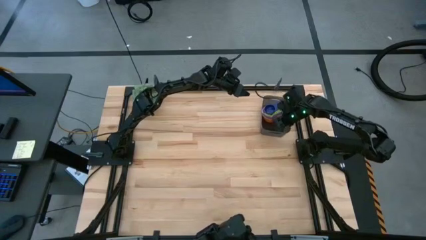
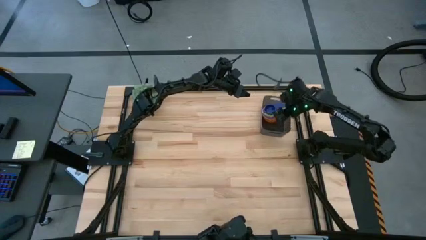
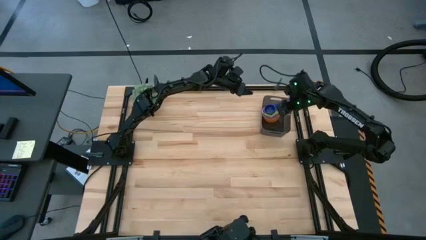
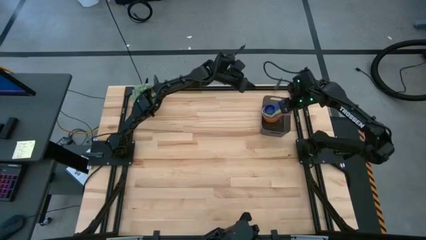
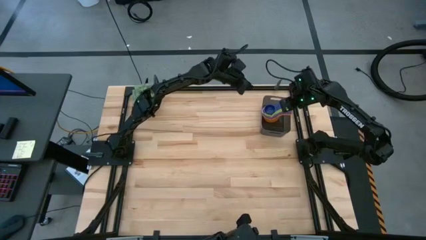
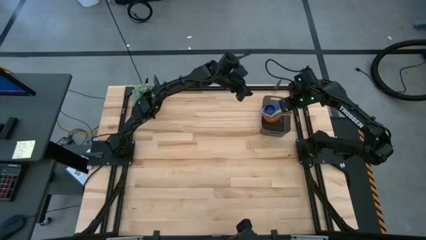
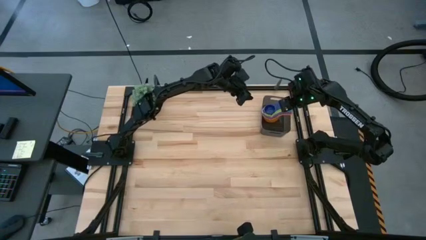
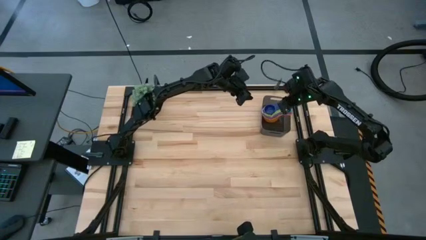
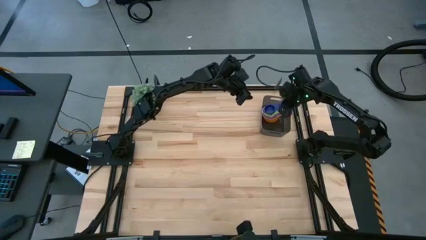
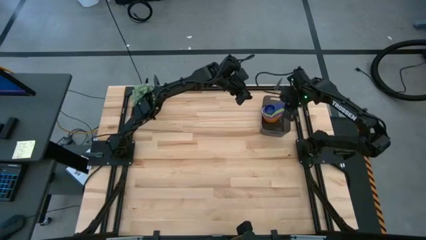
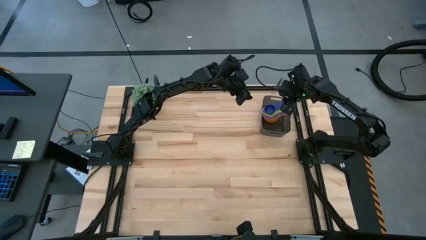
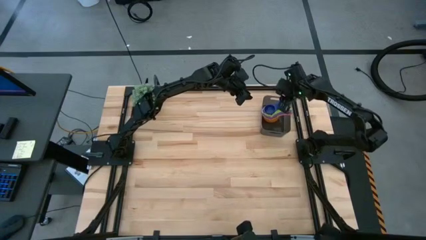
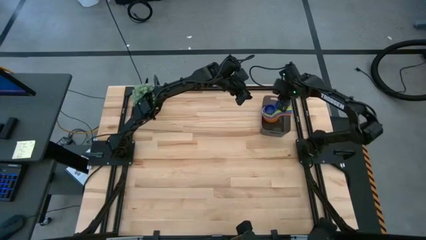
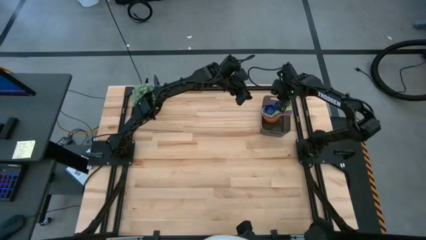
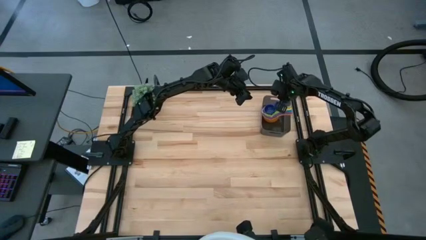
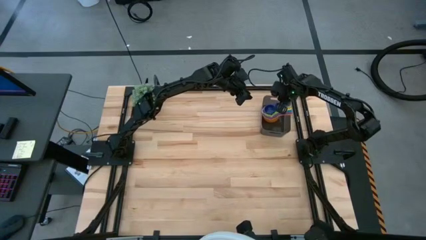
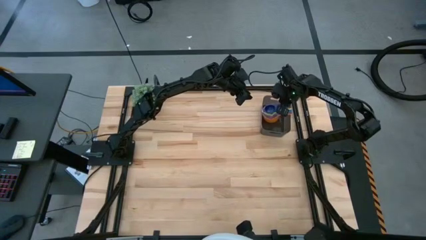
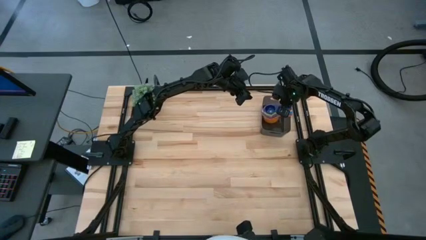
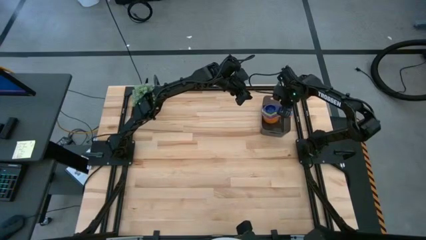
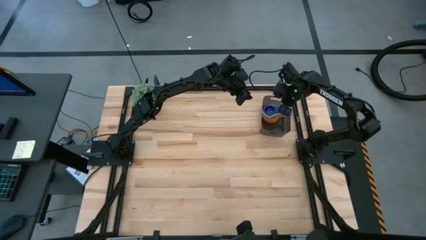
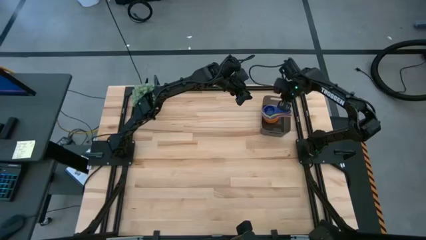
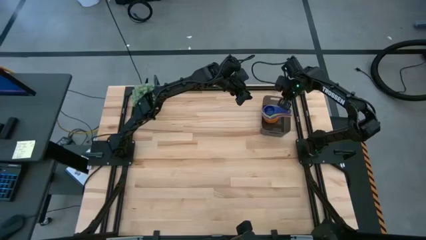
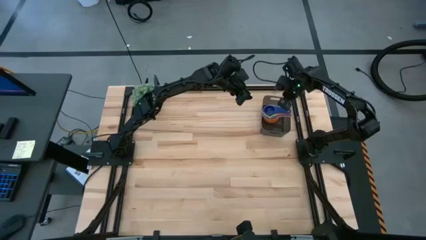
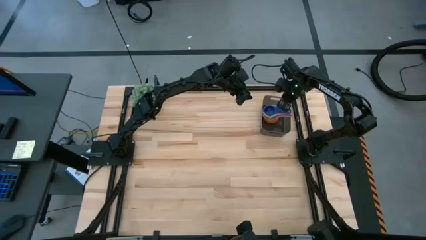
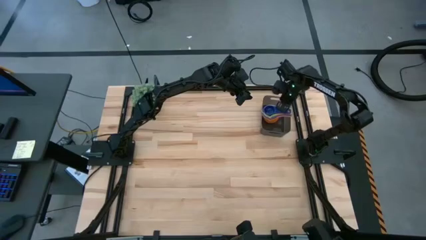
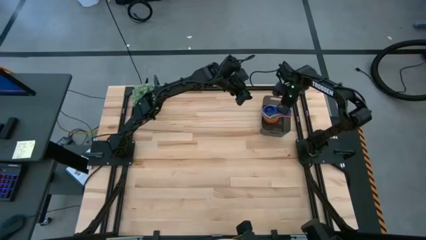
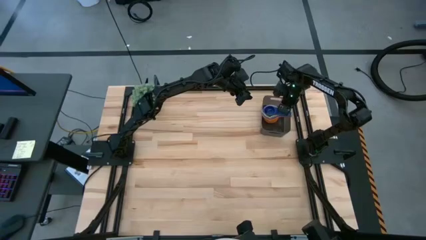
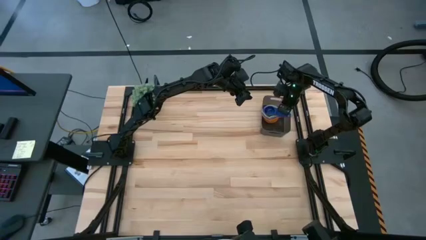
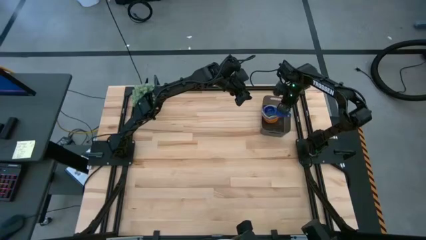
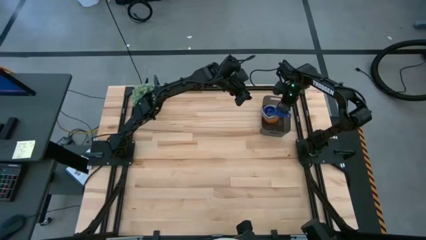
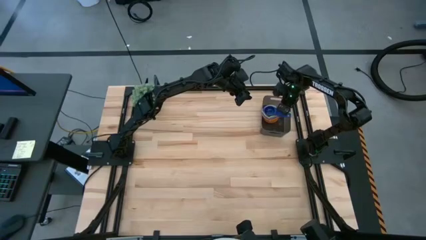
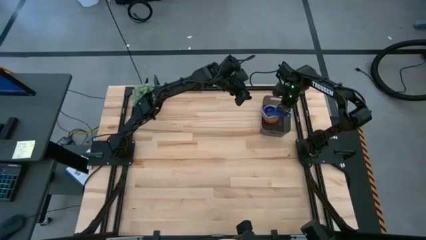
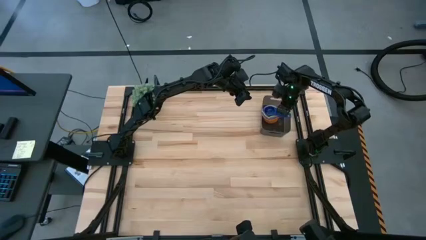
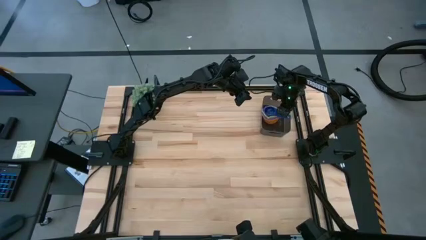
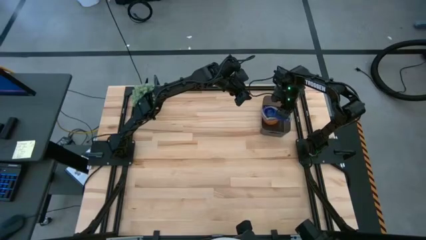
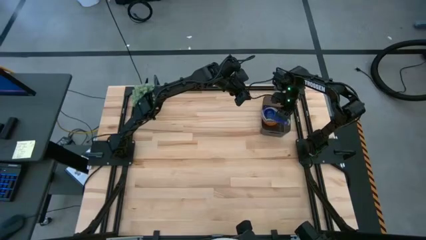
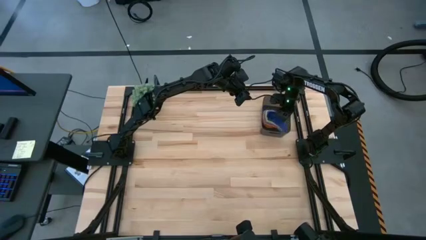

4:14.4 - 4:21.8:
Task: Nest measuring cups in basket
Adjust the nested measuring cups into the black bin

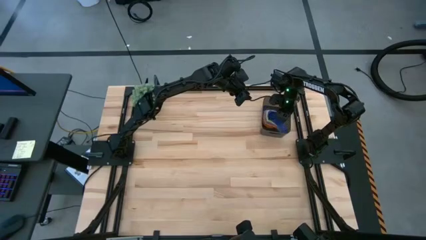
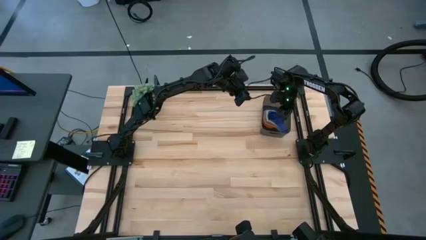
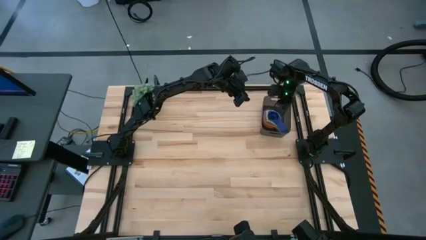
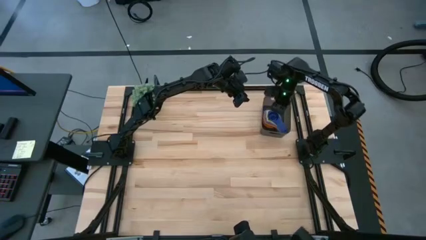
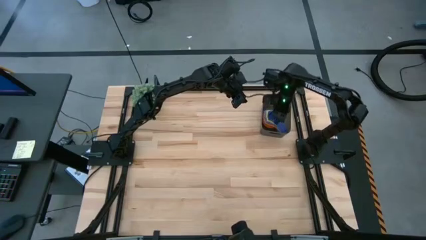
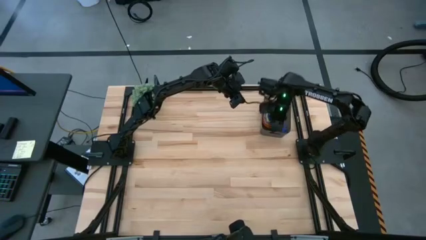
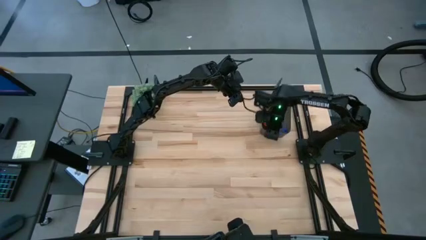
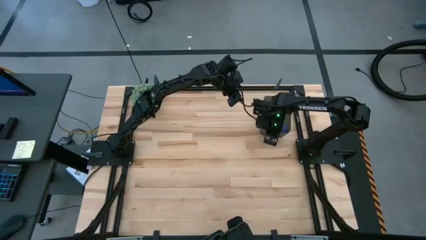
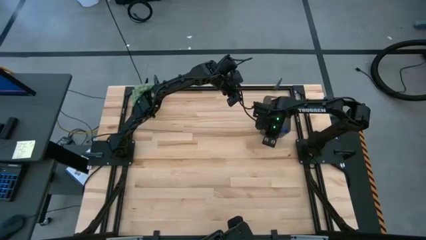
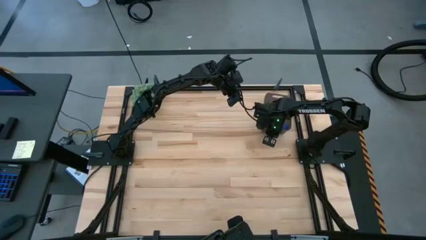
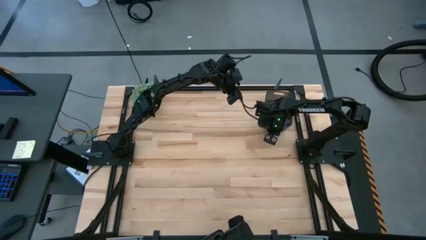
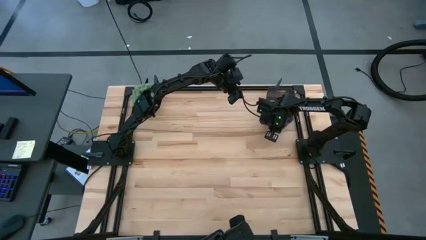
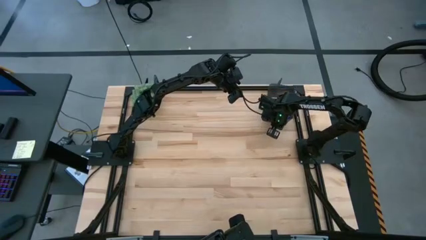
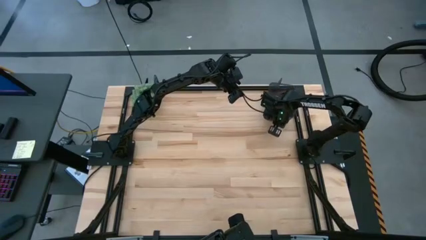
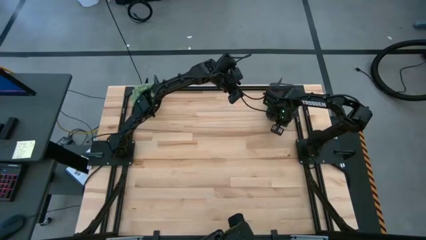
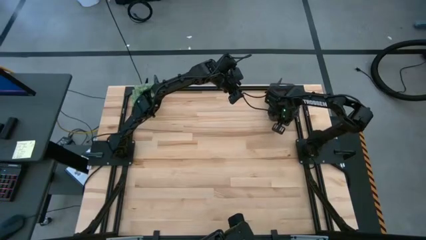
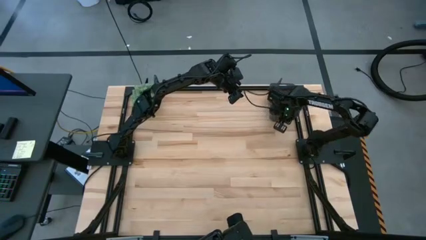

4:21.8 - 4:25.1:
Adjust the black bin

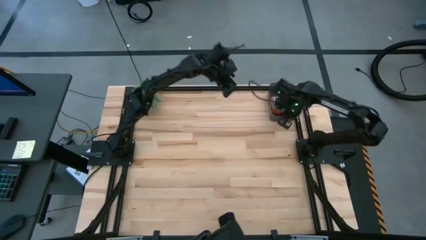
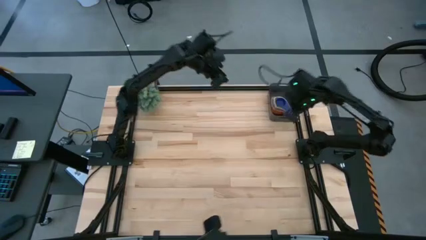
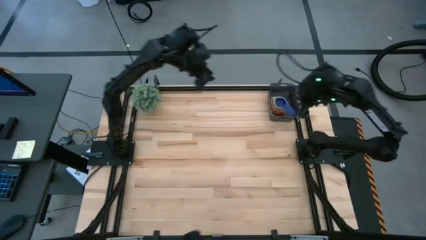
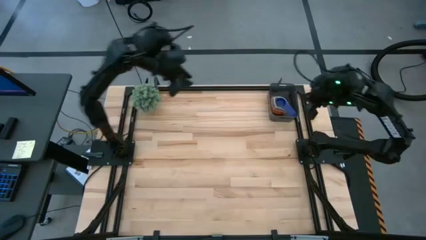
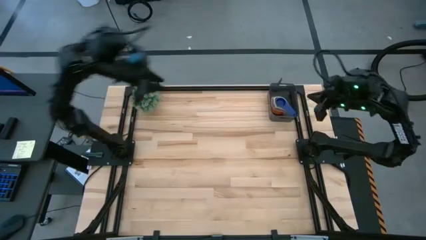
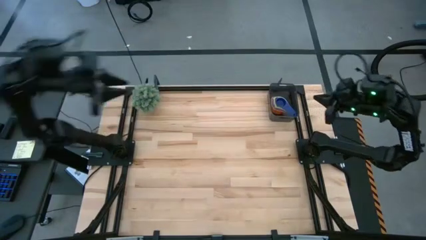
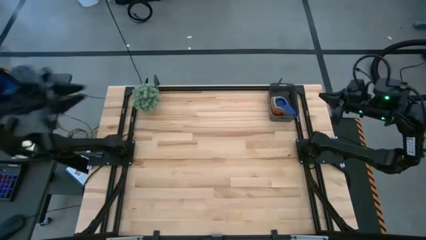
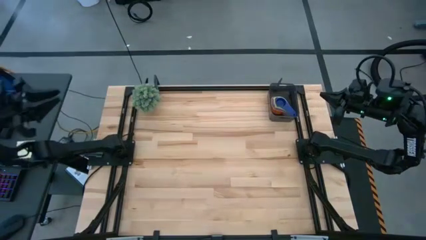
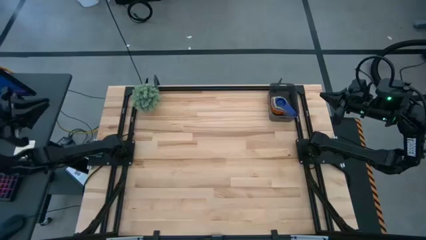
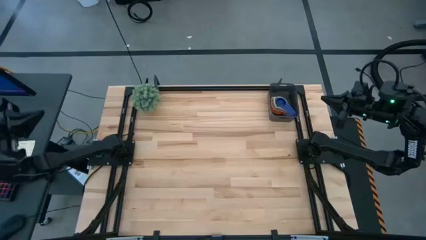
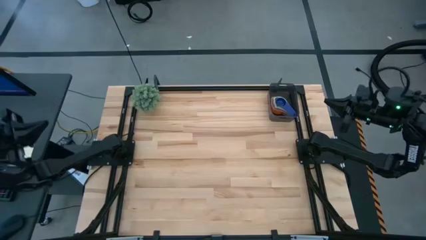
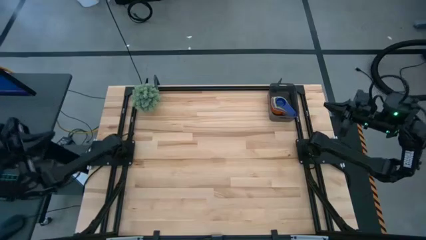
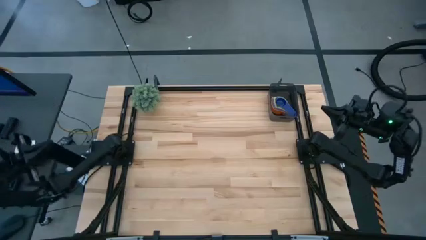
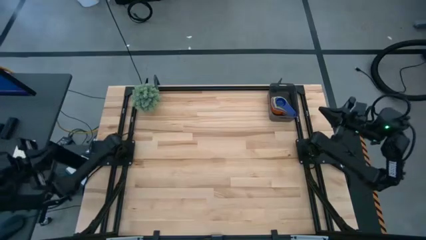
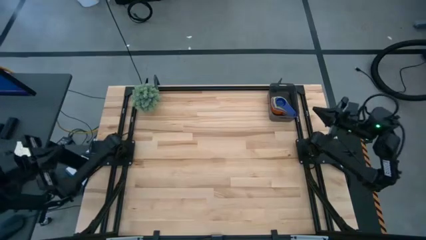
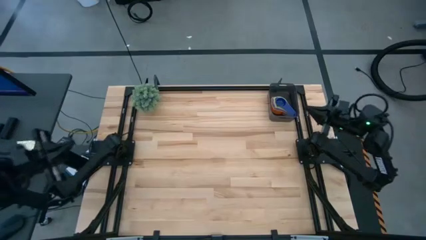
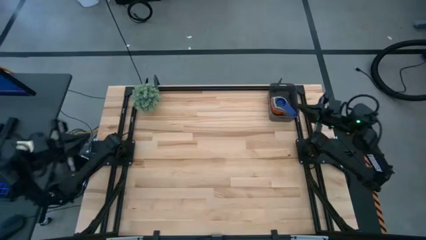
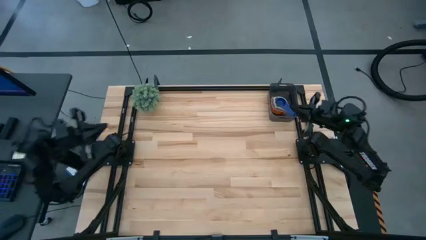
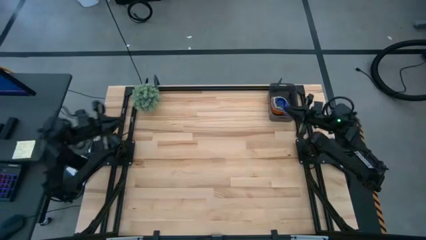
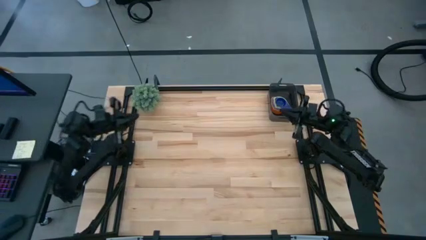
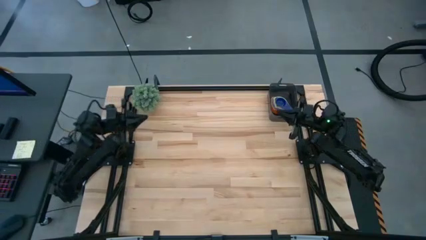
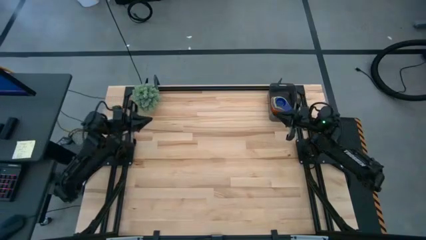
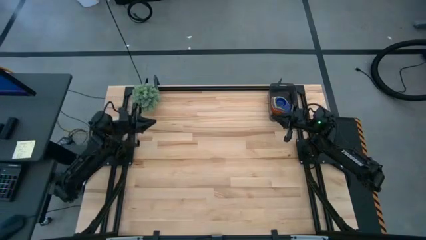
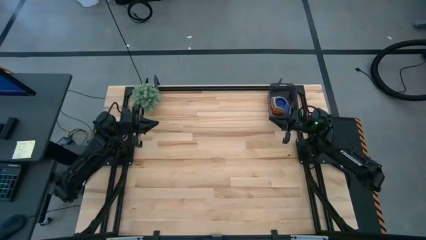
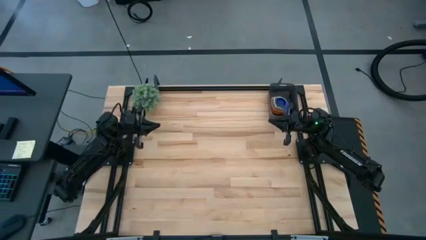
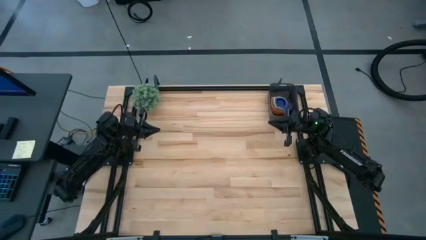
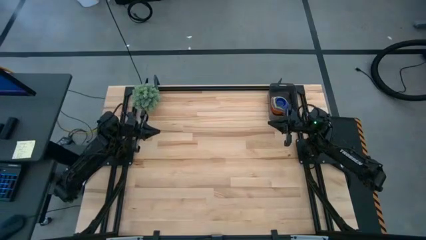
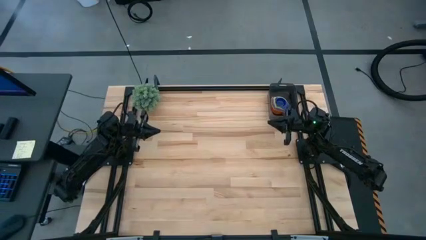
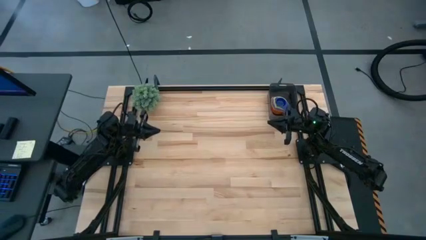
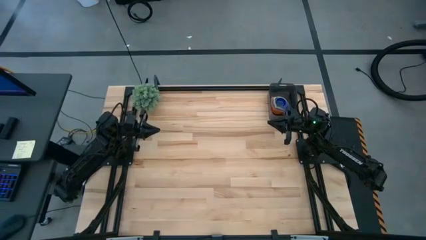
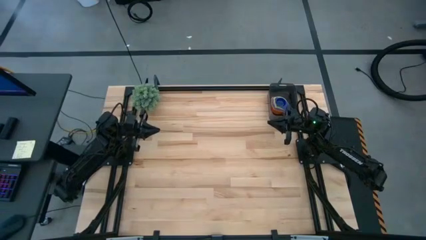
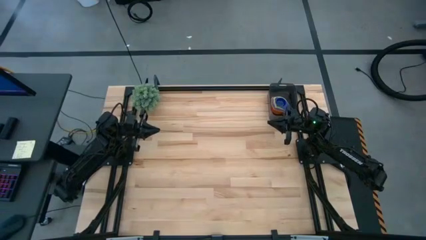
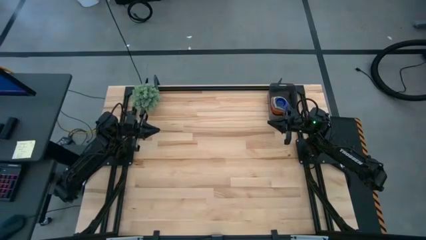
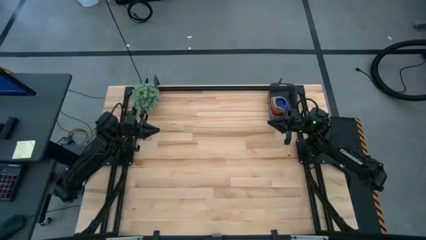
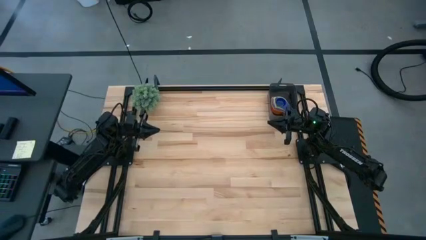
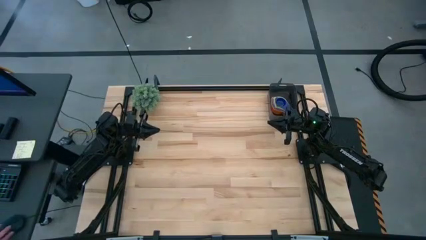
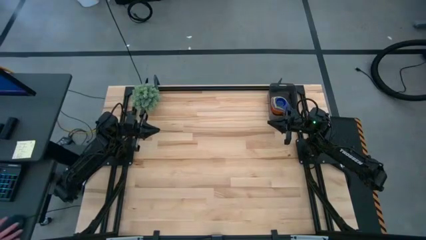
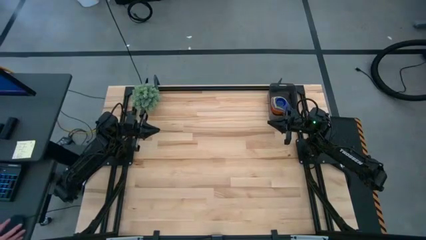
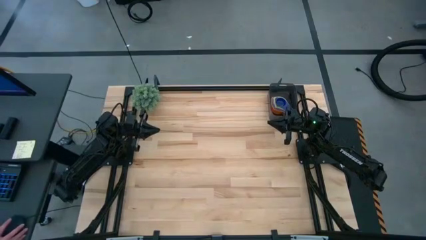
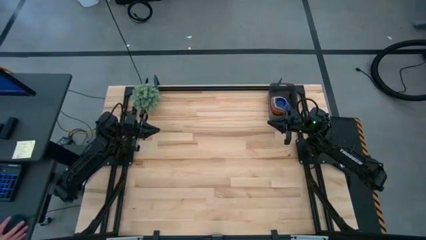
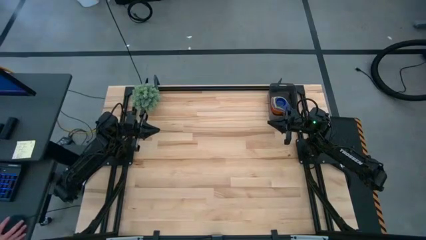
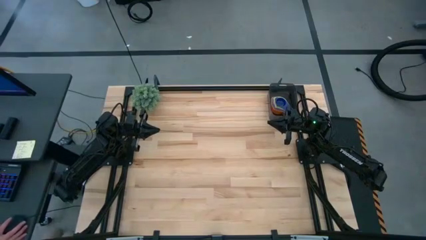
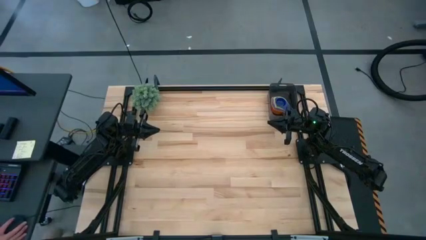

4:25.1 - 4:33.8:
Return to Home Position
